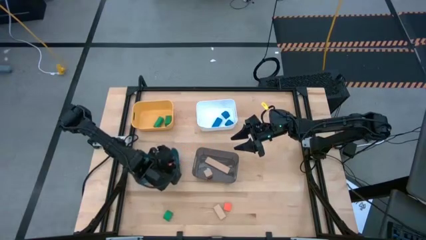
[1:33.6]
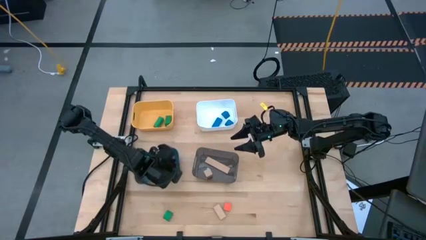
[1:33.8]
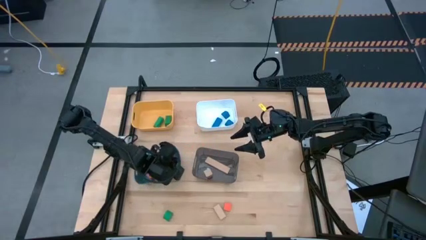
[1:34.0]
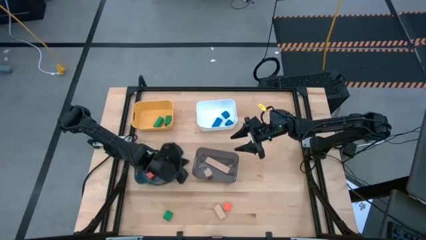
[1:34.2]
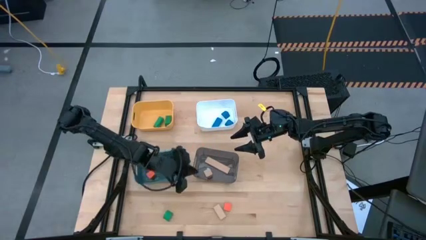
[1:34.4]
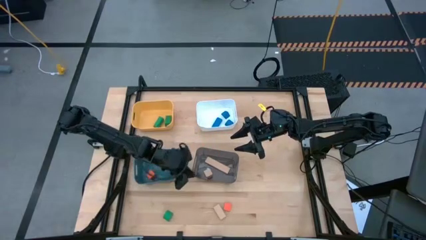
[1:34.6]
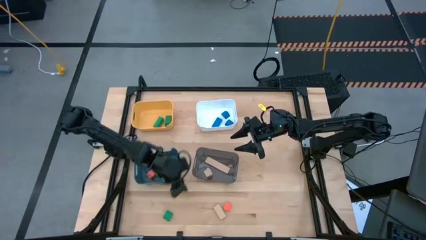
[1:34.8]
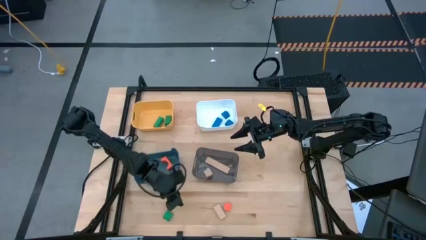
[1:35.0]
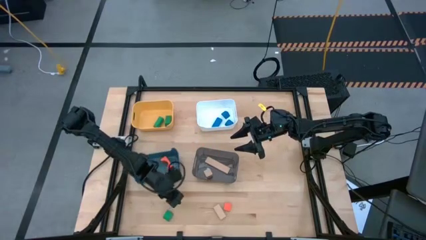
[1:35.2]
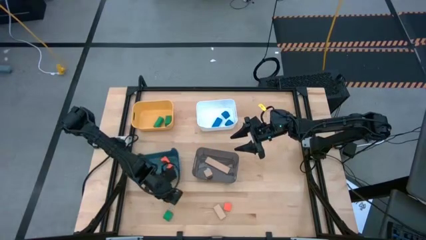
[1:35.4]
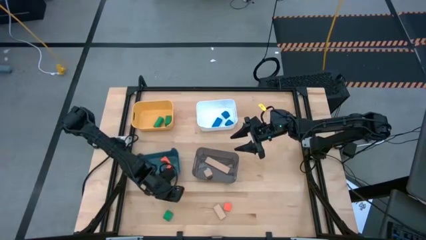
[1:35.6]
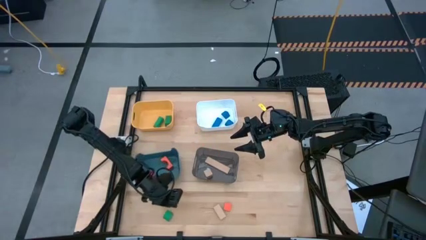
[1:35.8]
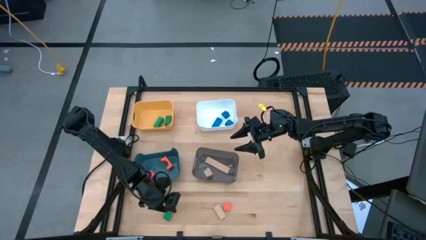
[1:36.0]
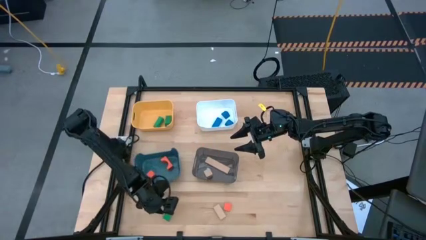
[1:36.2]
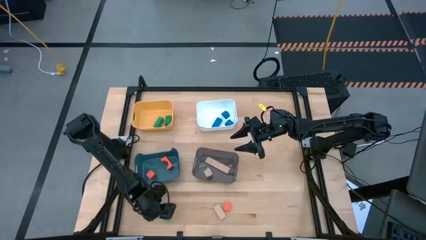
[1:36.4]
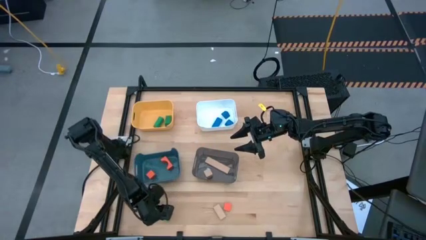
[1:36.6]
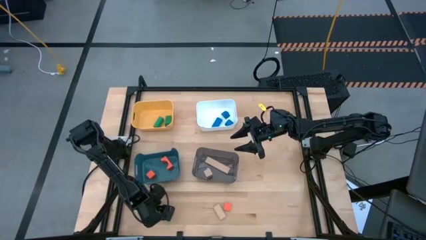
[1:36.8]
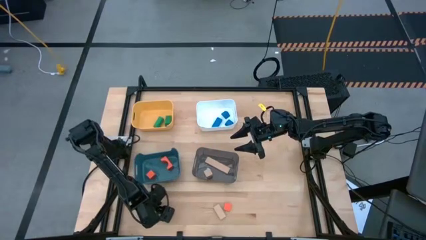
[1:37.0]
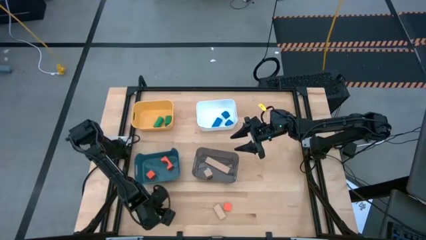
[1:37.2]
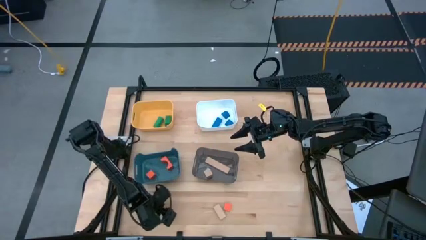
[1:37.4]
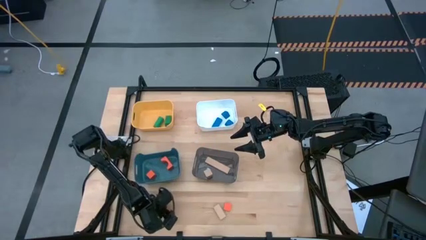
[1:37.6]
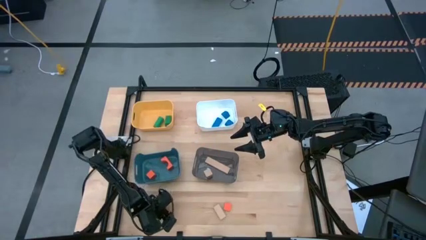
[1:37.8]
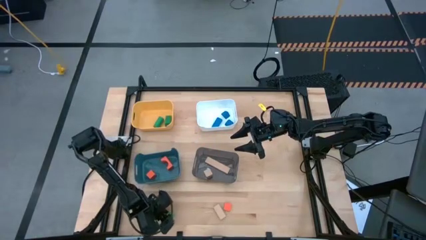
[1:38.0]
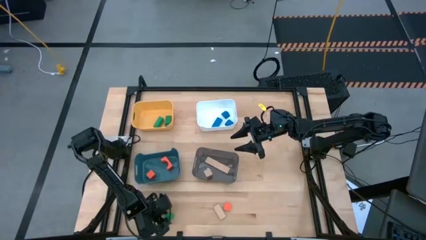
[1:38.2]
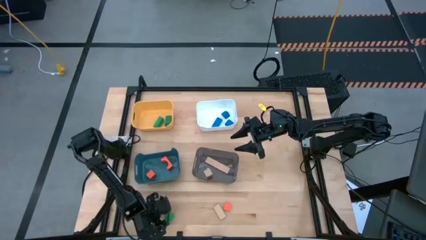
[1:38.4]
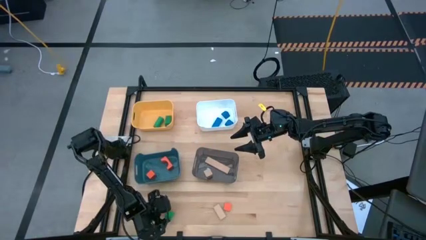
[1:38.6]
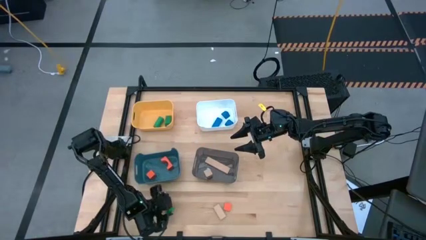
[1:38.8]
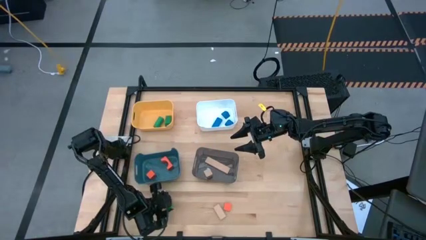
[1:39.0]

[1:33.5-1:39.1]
Task: Sort & place blocks by color
Put the green block into the yellow bin

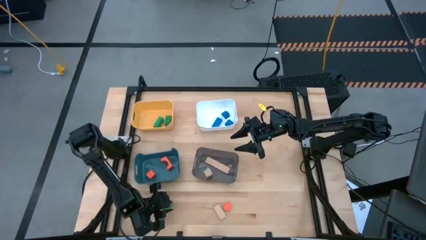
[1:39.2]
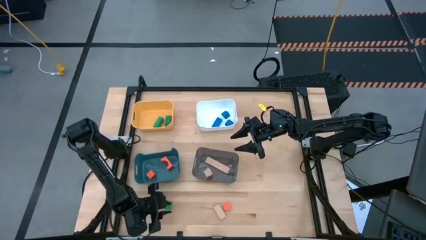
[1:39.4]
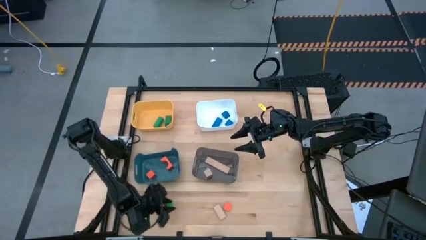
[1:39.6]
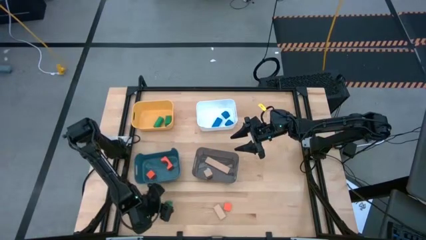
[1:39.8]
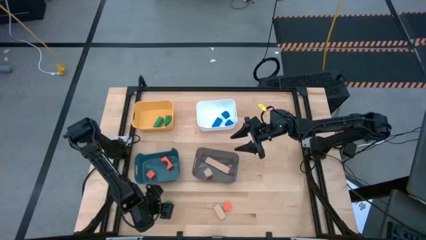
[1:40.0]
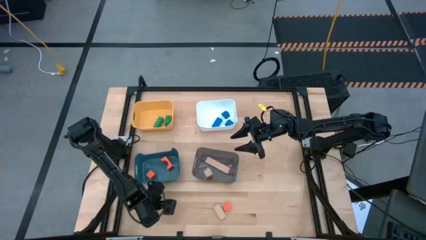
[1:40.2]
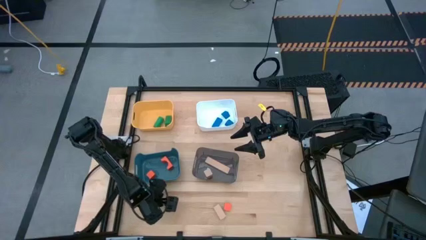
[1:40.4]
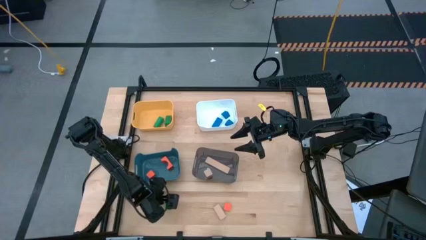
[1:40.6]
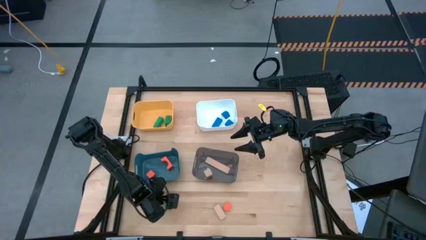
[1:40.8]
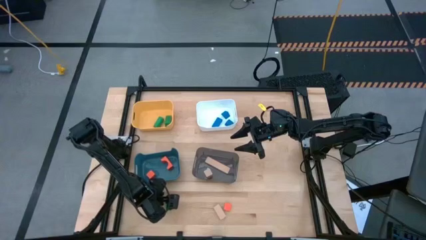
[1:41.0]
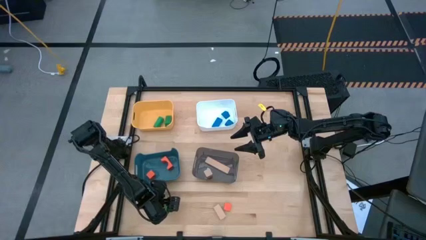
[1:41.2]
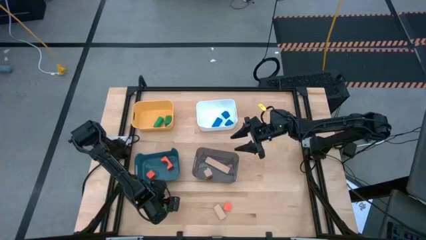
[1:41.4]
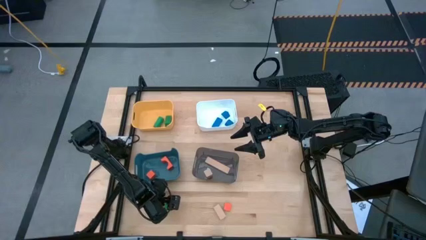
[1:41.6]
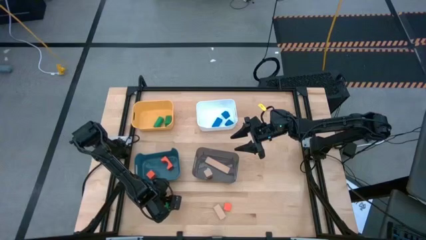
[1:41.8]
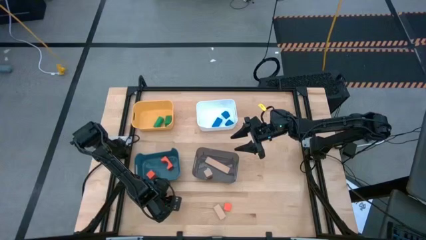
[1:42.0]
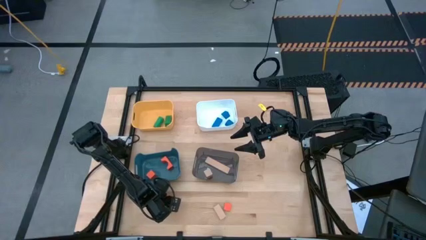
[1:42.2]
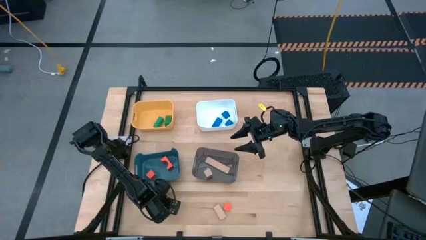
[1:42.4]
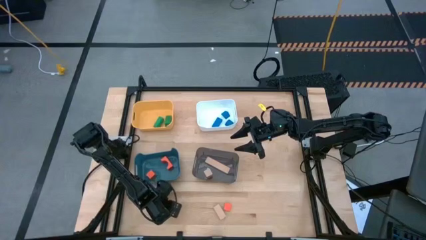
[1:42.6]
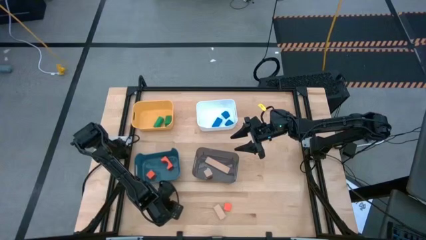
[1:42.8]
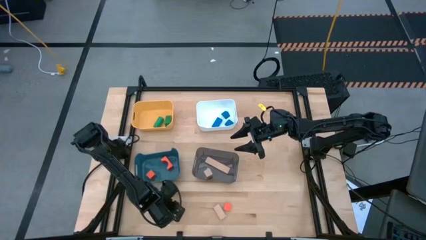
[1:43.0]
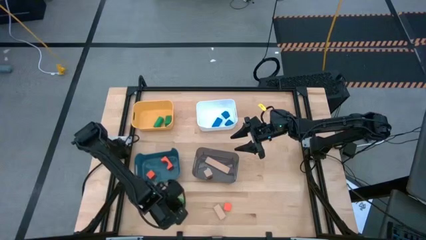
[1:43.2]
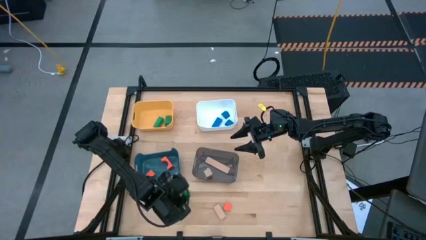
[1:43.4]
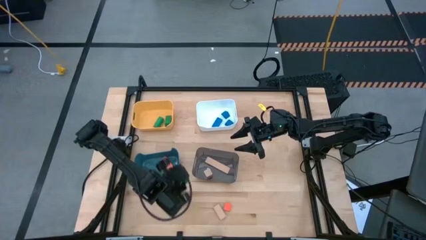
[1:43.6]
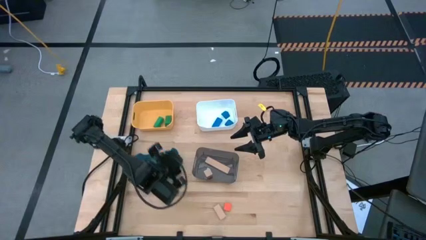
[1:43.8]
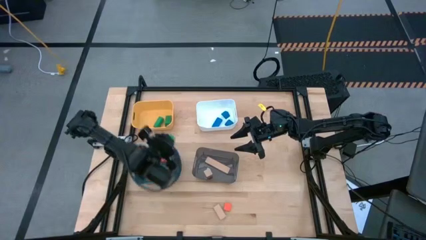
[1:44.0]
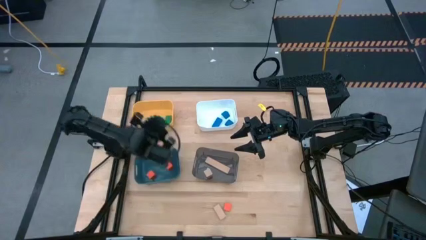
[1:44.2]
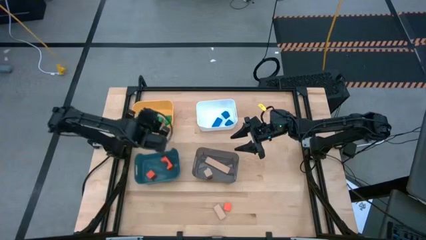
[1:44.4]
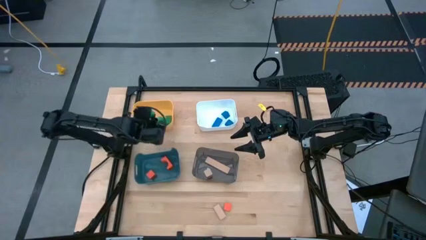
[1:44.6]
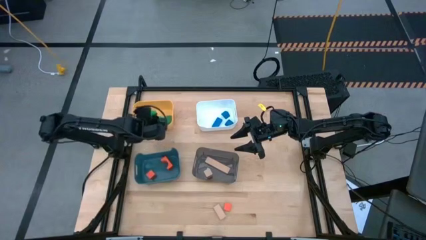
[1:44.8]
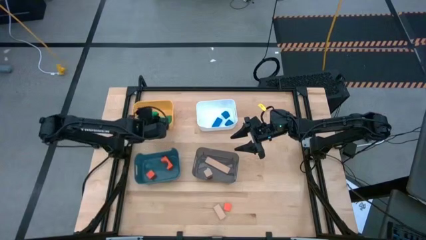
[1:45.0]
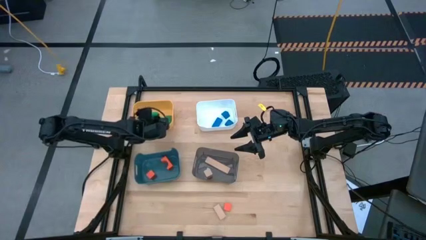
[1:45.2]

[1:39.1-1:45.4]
Put the green block into the yellow bin
